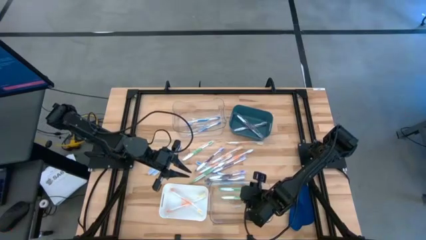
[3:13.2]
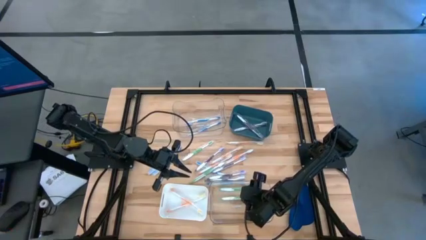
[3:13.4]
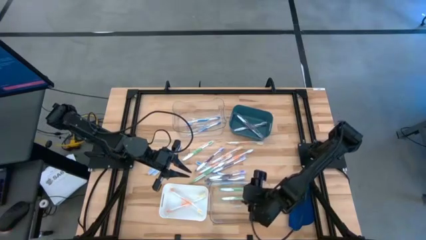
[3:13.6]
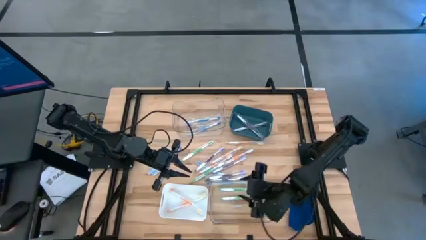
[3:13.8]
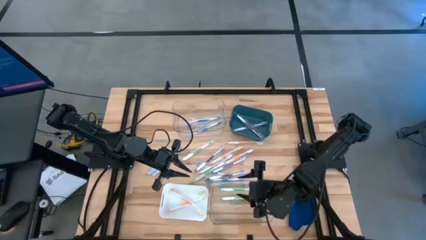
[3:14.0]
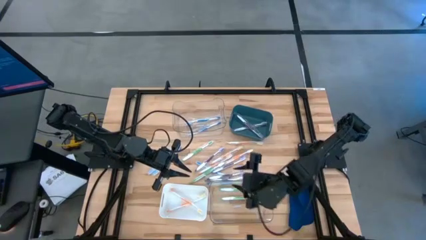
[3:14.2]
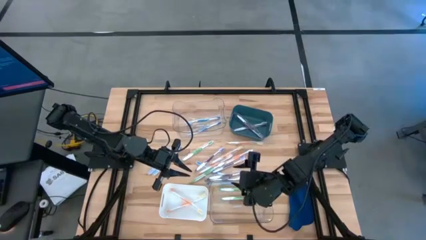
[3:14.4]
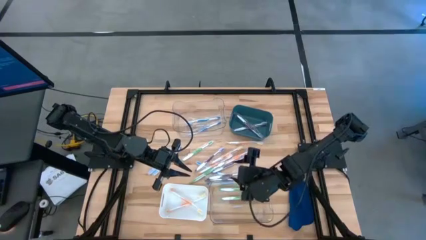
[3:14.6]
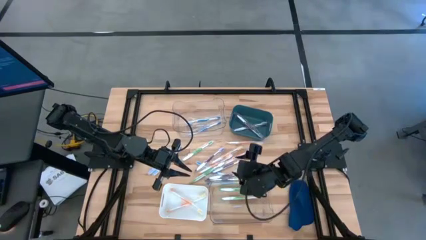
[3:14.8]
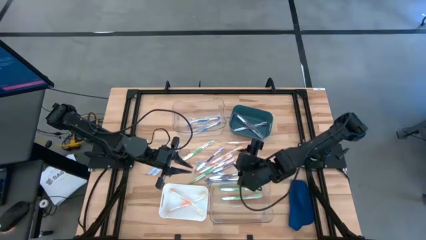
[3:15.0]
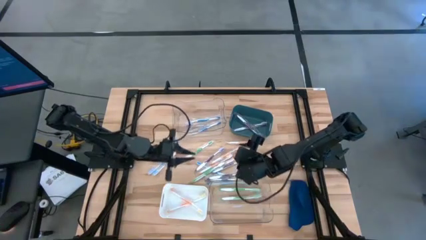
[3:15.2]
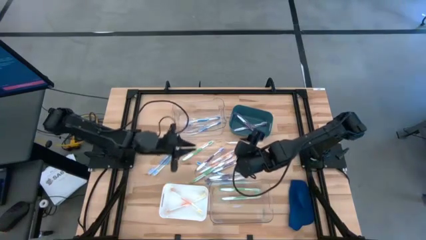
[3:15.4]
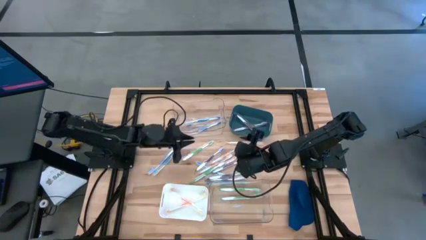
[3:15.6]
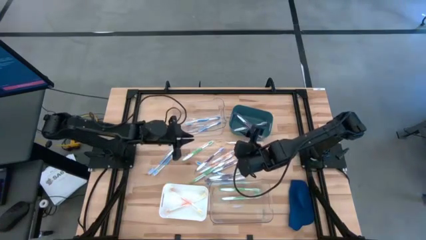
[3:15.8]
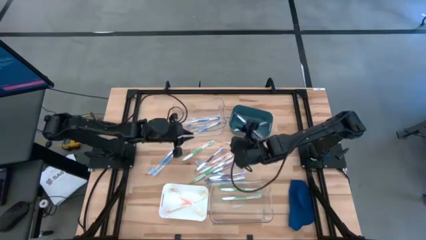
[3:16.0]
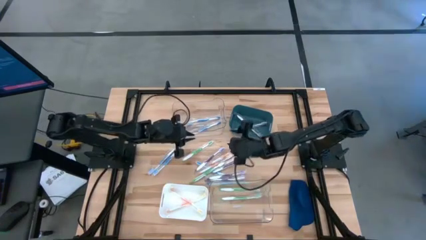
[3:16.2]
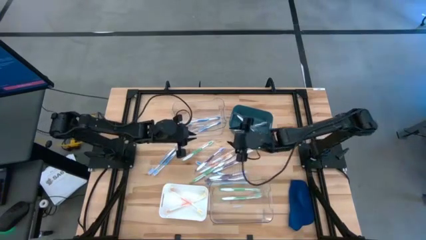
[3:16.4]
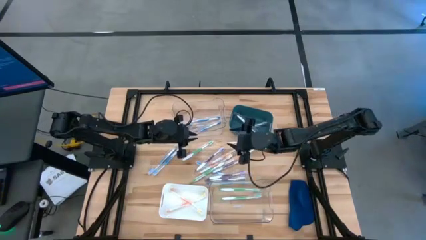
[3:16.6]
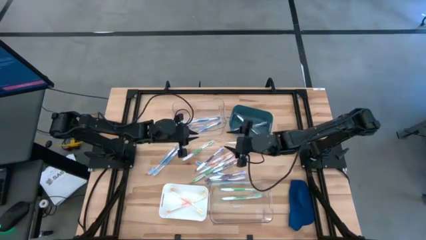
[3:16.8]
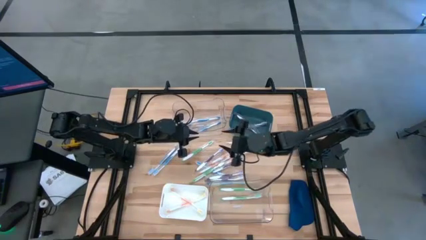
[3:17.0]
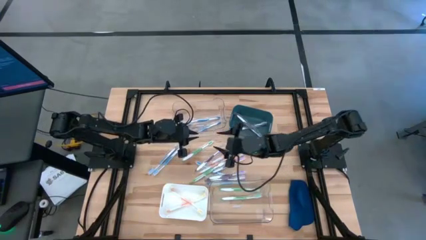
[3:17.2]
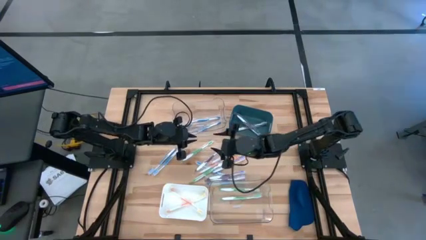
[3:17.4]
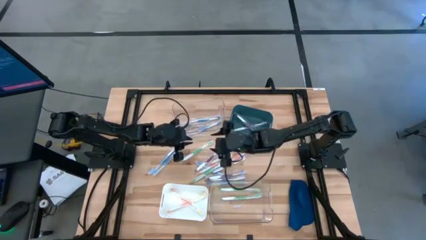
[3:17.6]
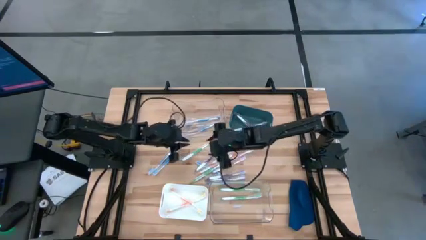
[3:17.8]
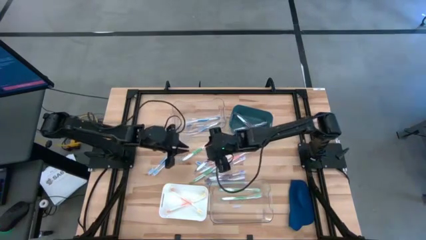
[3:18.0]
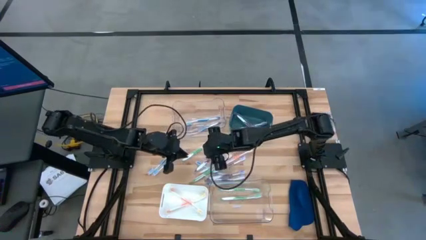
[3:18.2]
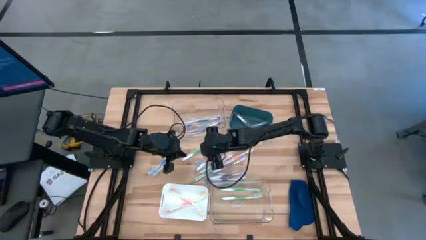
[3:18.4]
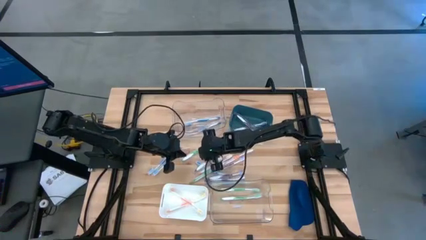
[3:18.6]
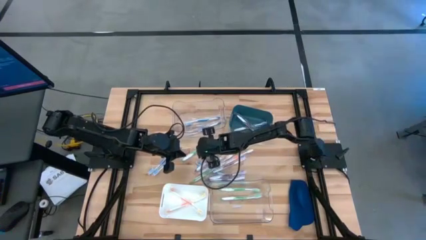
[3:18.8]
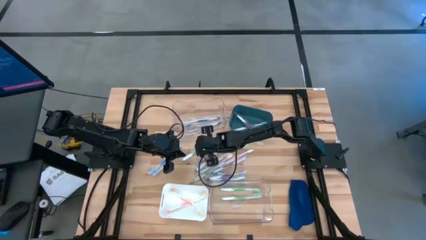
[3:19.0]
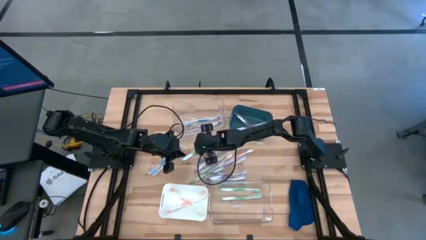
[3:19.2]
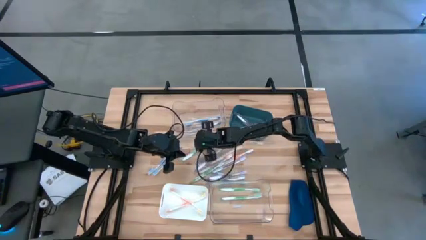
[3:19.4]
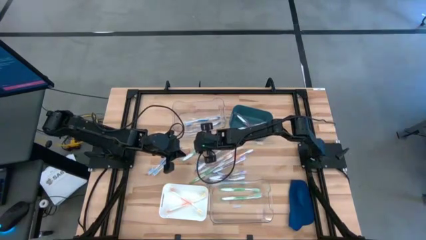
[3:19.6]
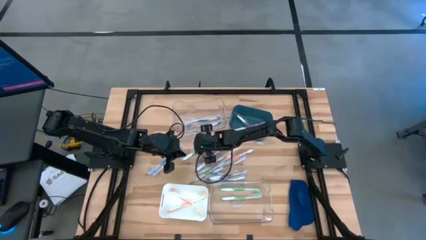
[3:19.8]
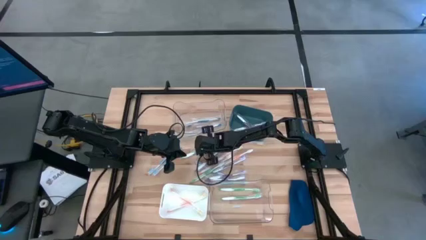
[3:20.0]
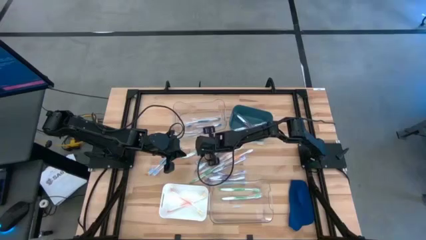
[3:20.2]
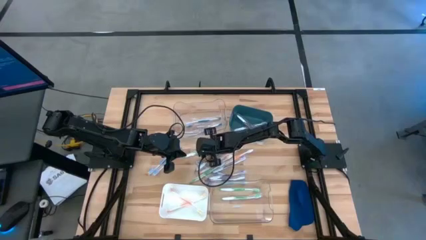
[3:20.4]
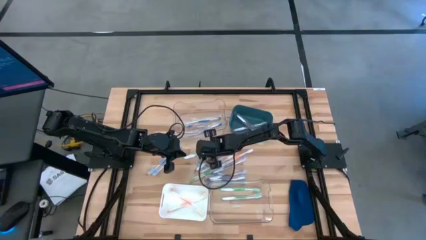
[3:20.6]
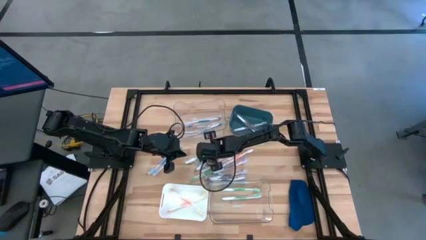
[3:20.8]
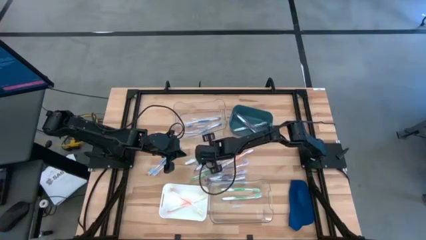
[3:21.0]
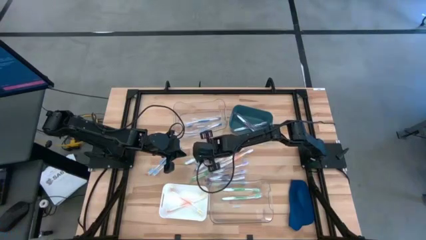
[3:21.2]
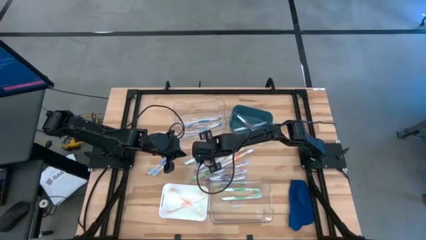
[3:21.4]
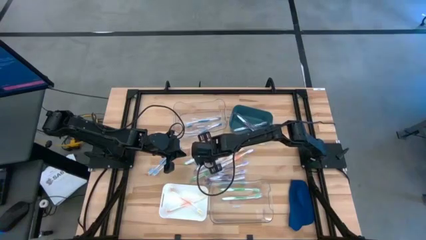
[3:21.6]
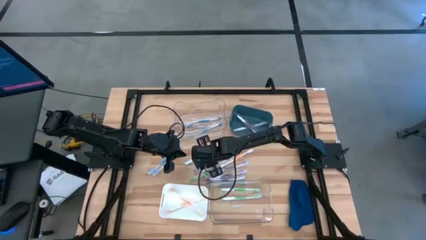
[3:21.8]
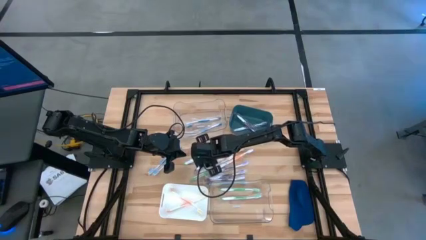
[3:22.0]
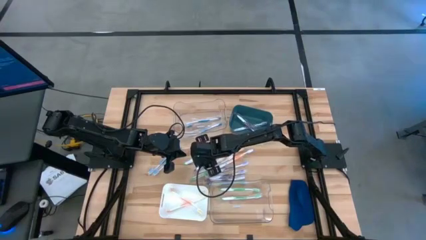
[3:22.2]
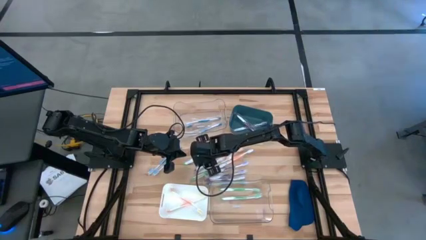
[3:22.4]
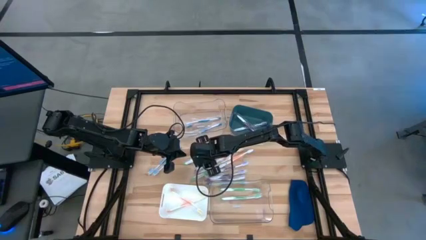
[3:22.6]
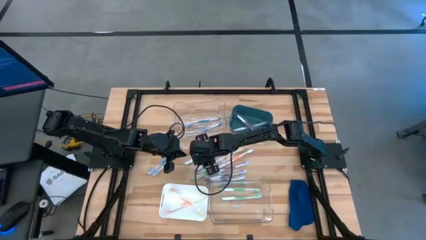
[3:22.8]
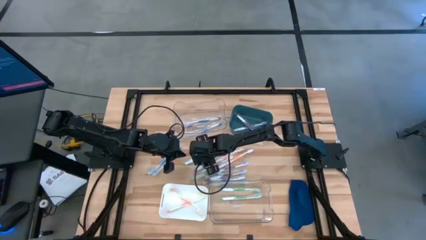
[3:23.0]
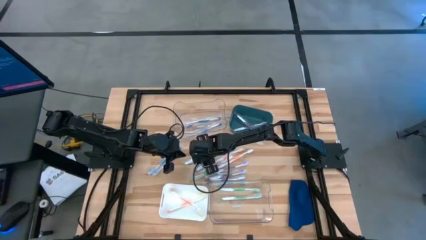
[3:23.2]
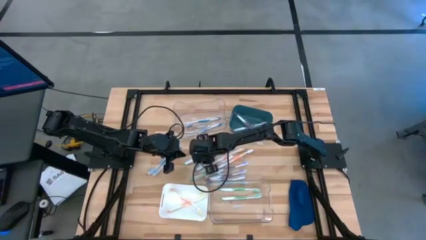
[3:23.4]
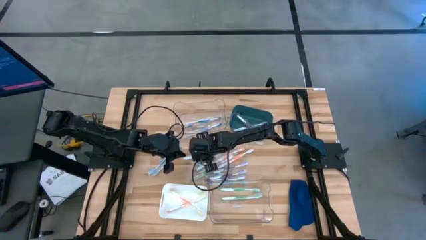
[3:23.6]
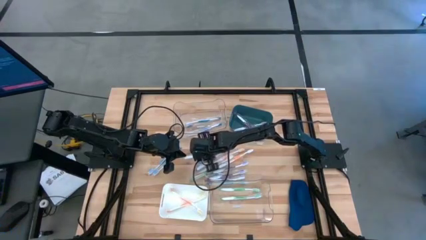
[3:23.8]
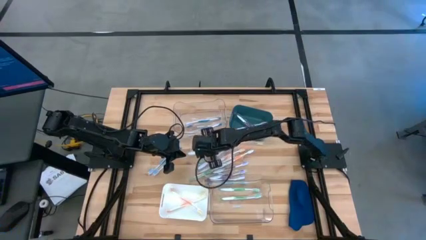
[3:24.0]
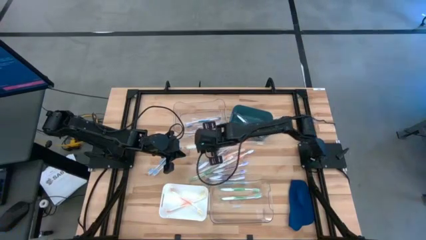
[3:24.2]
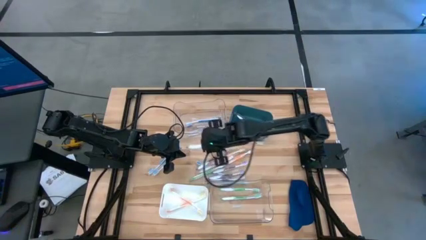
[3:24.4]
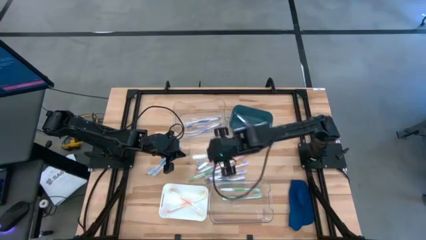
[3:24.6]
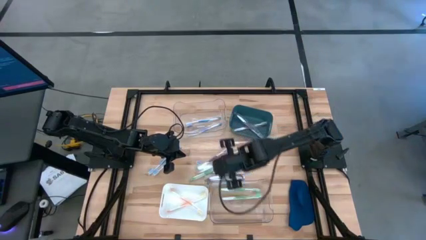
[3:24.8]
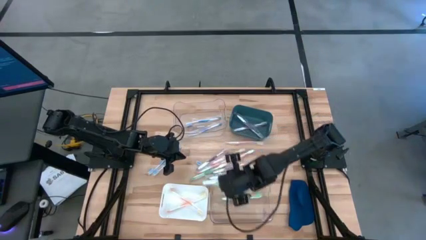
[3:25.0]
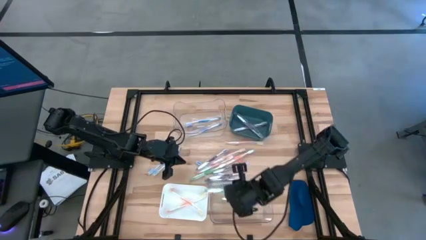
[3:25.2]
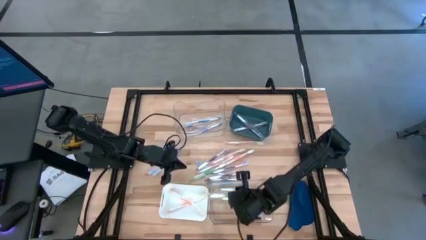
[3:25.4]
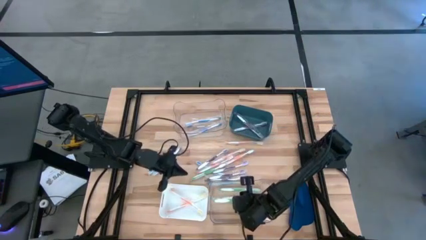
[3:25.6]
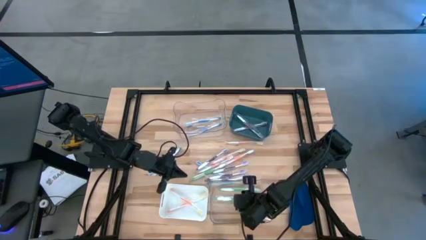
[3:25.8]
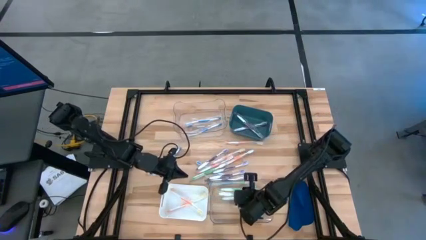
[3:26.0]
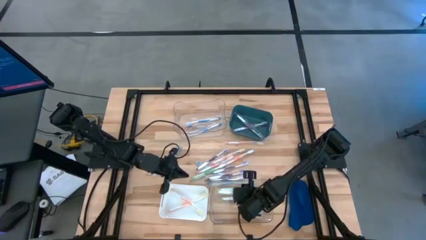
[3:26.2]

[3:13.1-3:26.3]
Task: Pick & Place Toothbrushes
Put the green toothbrush into the bottom transparent bin
